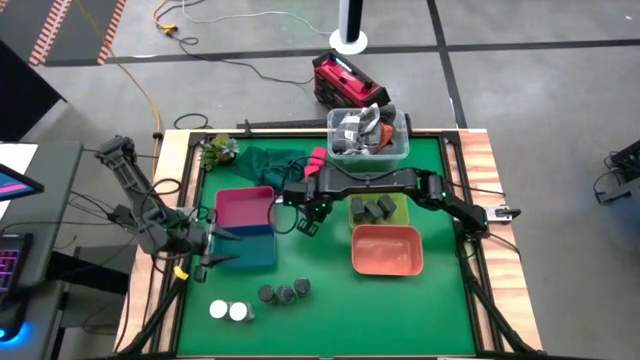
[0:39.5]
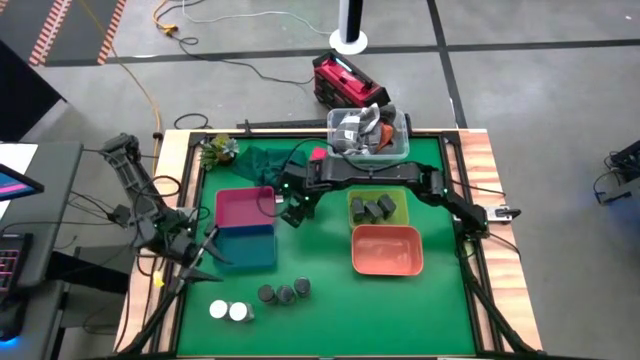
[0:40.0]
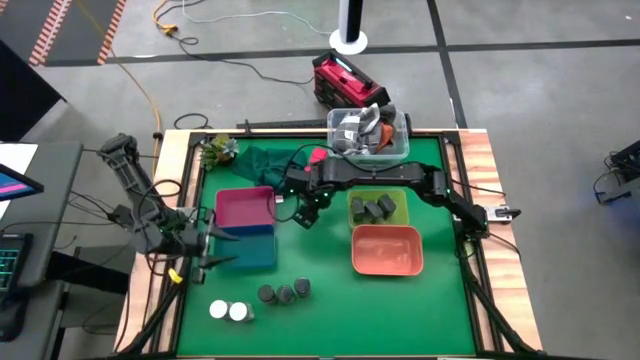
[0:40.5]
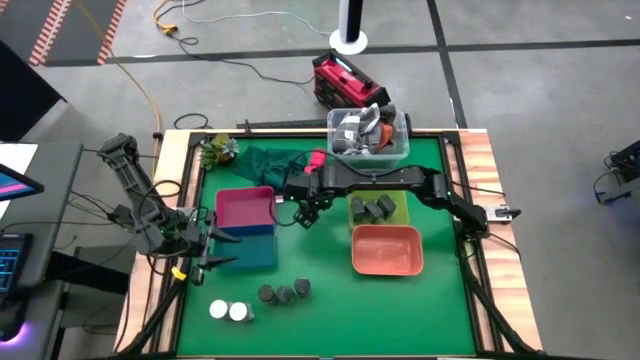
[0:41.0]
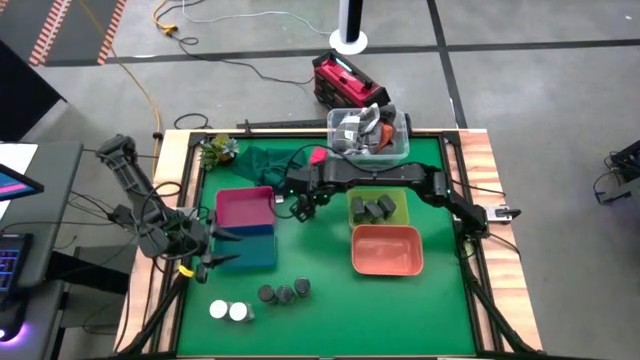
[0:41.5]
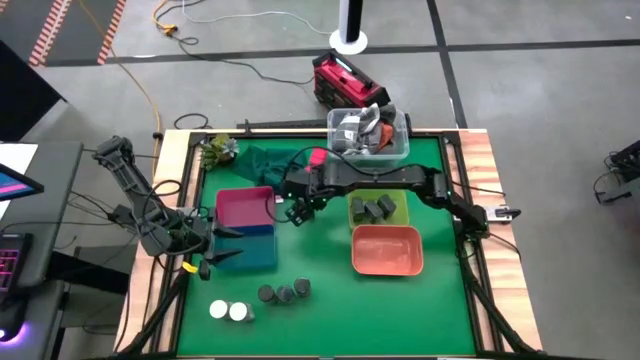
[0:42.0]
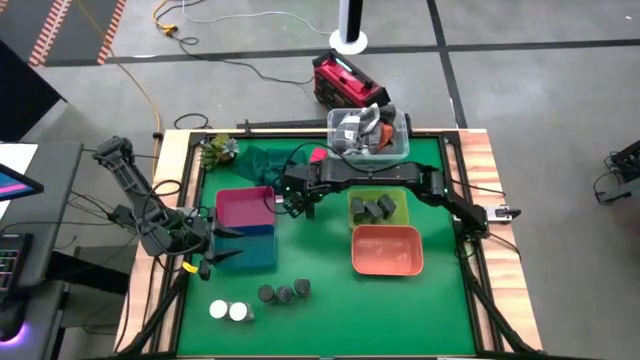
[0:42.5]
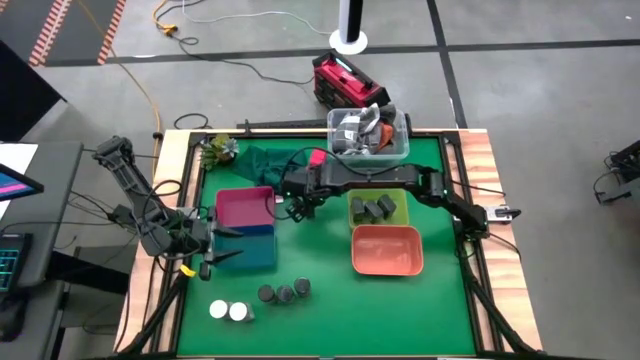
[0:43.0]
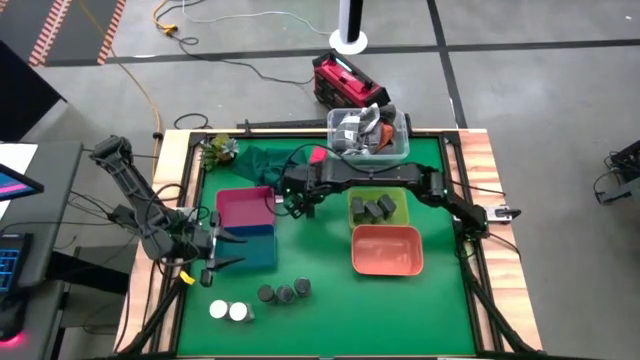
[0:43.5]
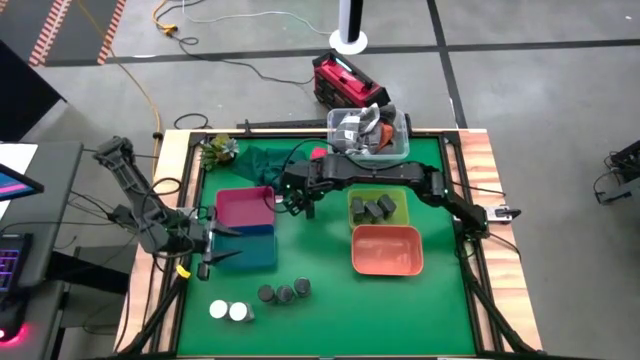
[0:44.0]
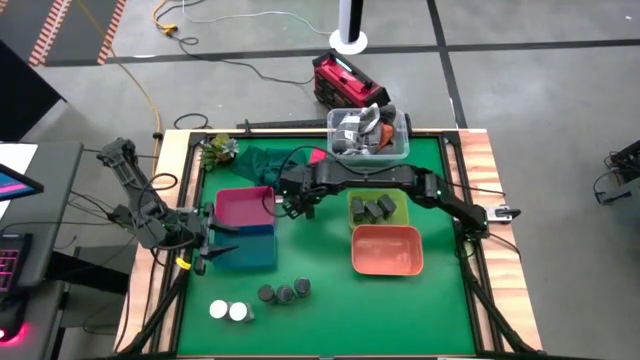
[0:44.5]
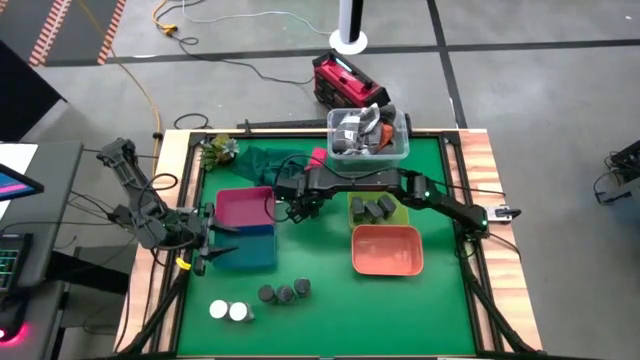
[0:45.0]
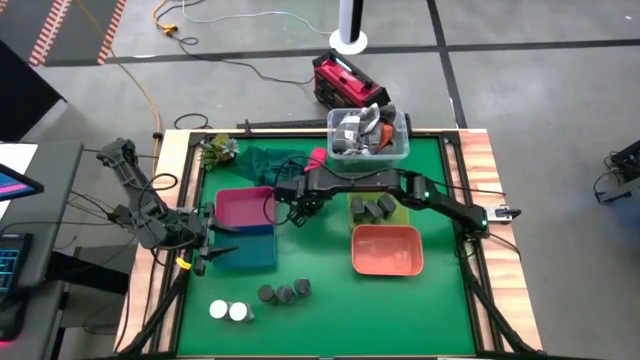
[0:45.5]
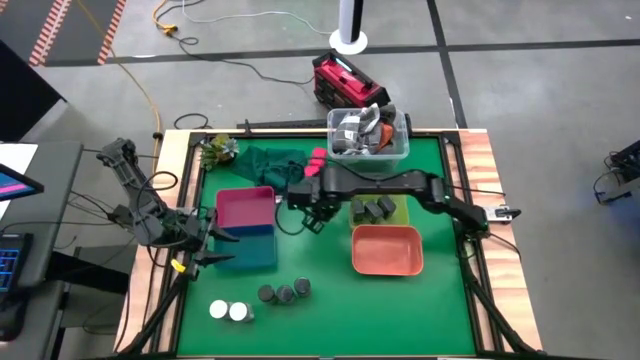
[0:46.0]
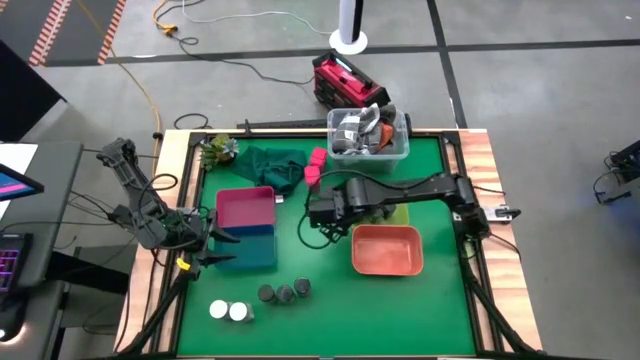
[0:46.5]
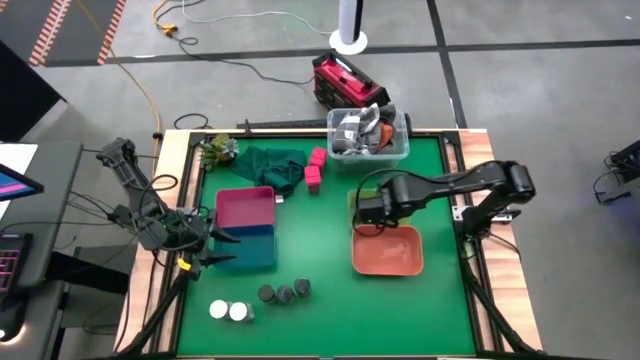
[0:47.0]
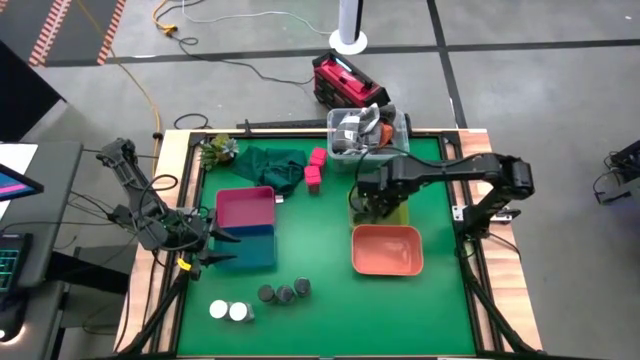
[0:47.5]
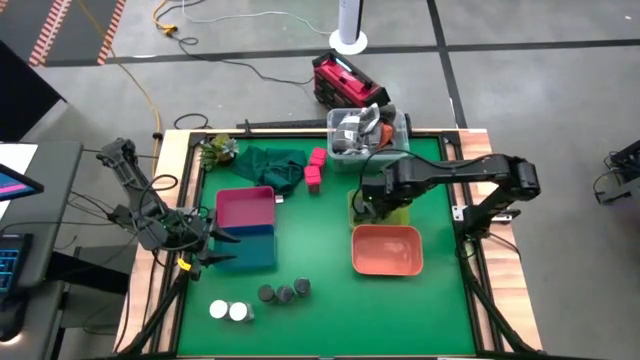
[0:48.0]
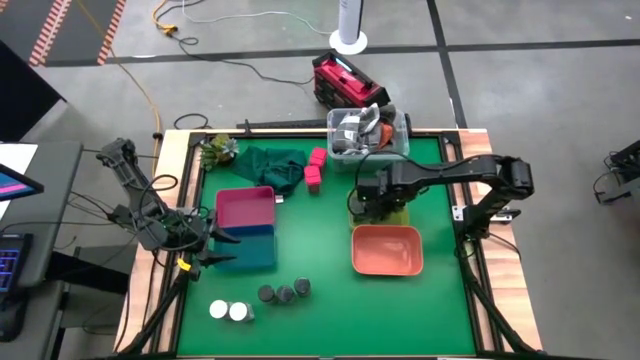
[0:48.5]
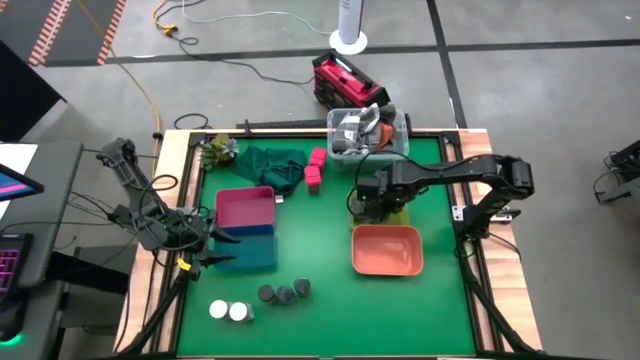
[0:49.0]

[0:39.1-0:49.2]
Task: Sort spices by type
Put the black spice can into the yellow bin

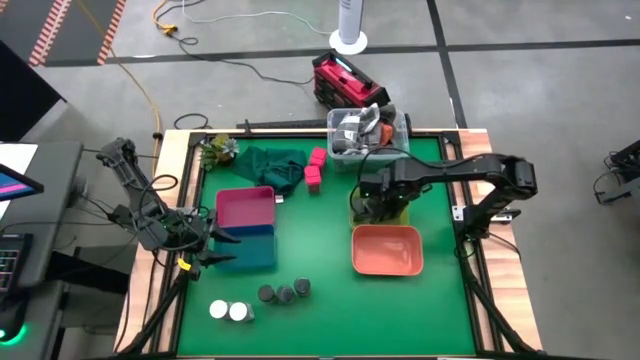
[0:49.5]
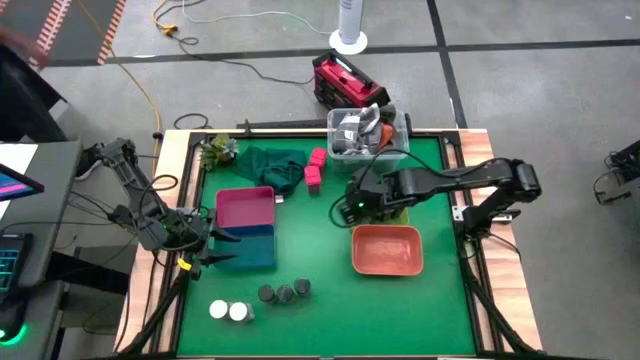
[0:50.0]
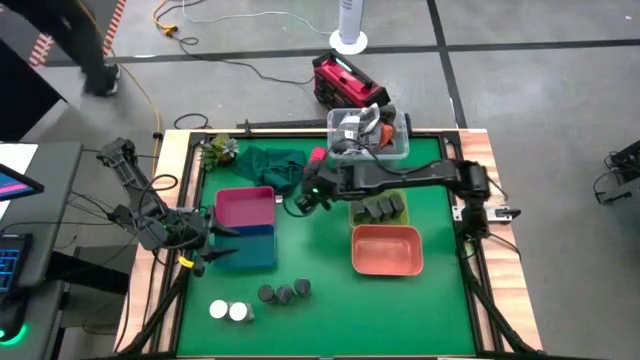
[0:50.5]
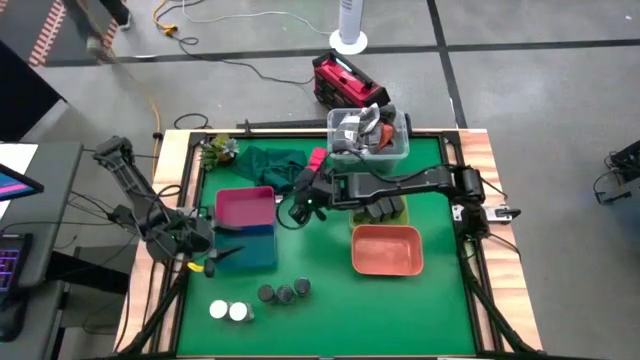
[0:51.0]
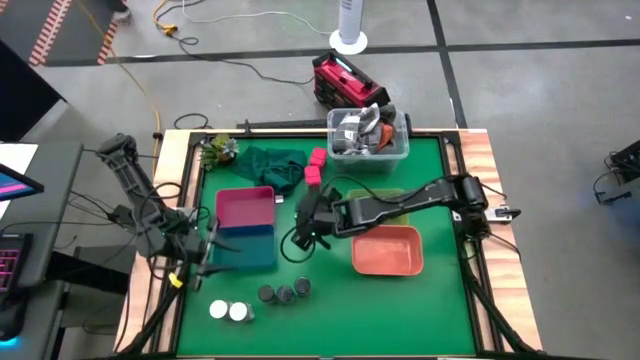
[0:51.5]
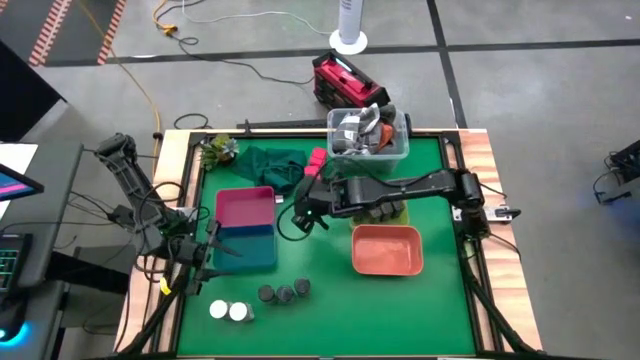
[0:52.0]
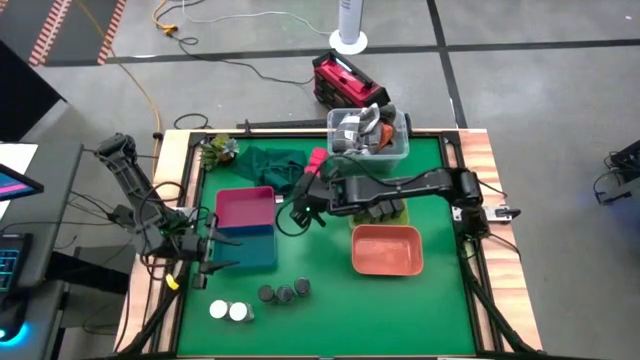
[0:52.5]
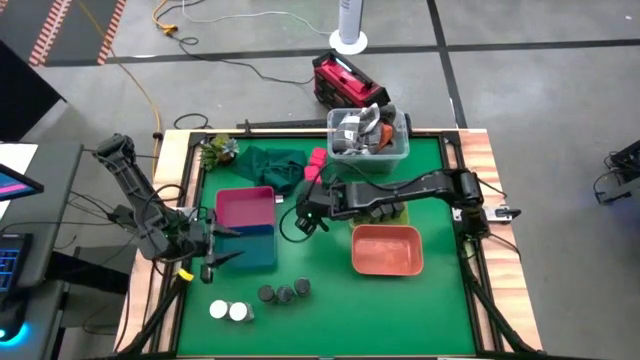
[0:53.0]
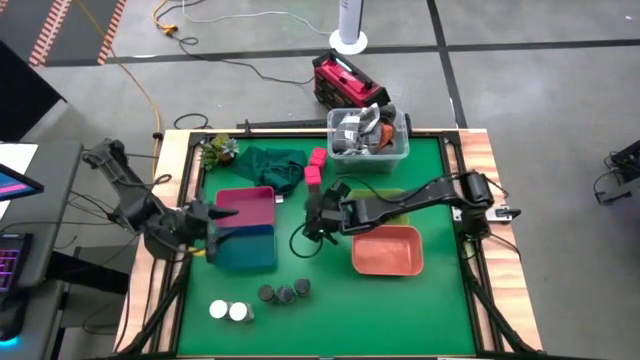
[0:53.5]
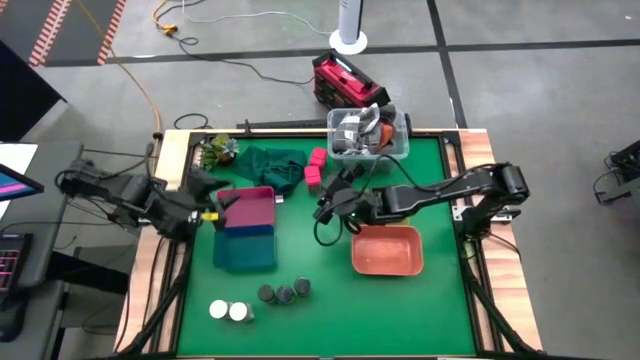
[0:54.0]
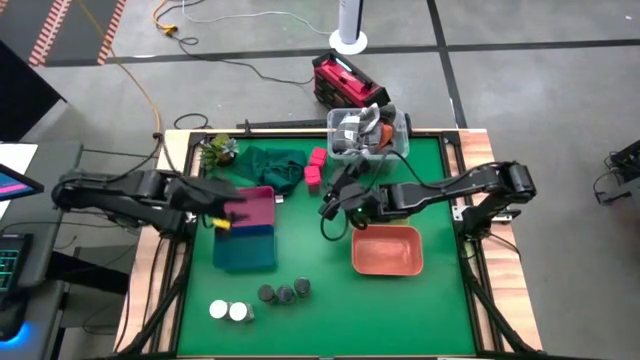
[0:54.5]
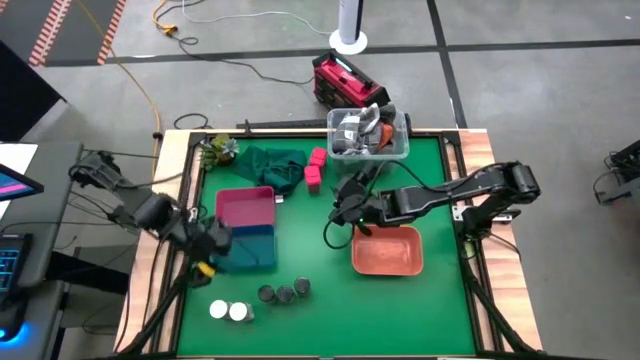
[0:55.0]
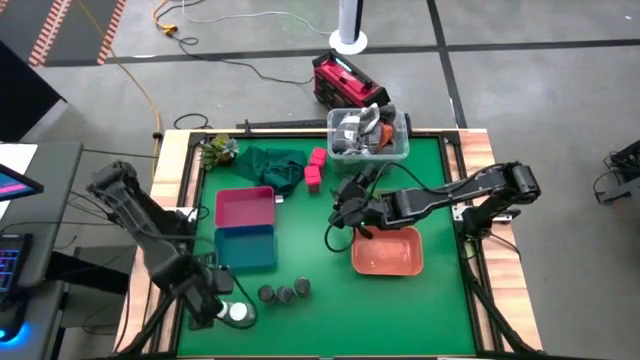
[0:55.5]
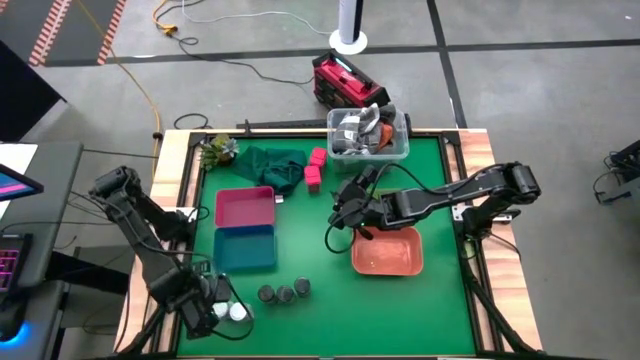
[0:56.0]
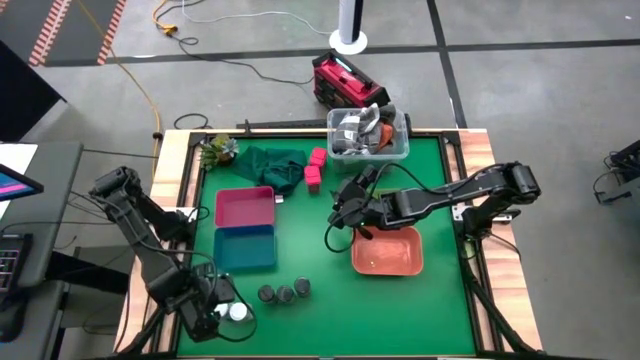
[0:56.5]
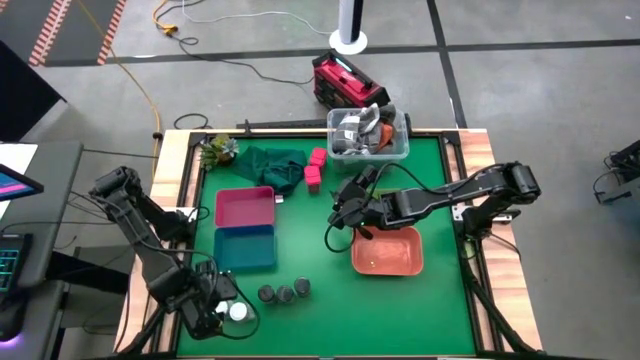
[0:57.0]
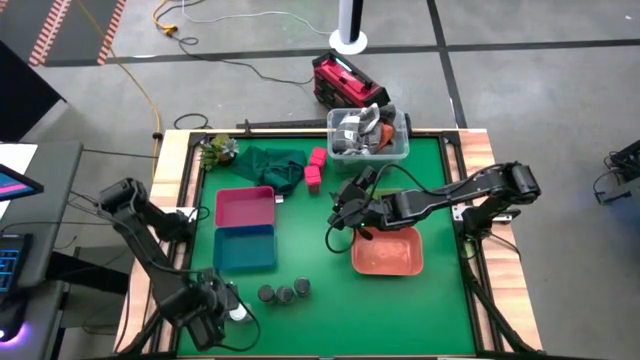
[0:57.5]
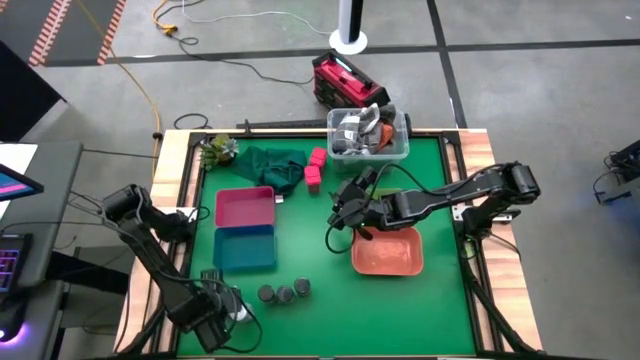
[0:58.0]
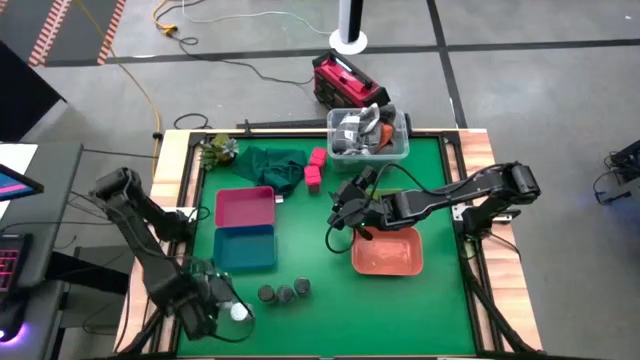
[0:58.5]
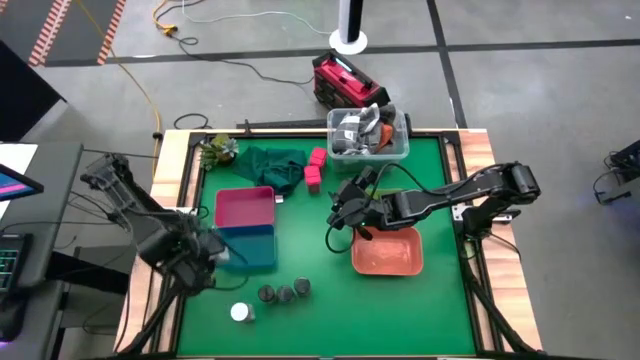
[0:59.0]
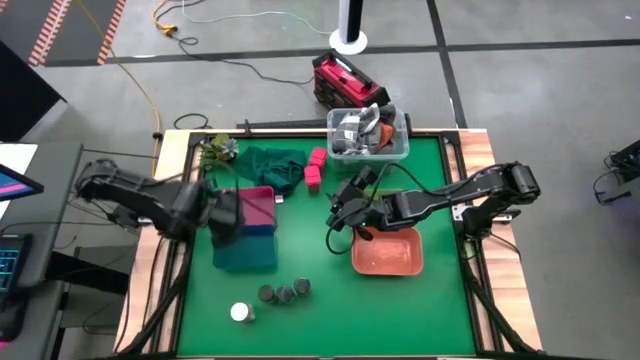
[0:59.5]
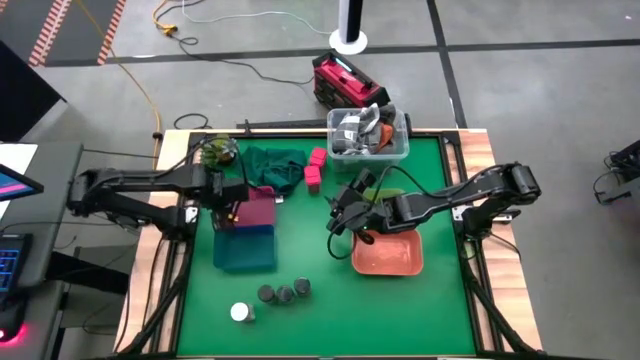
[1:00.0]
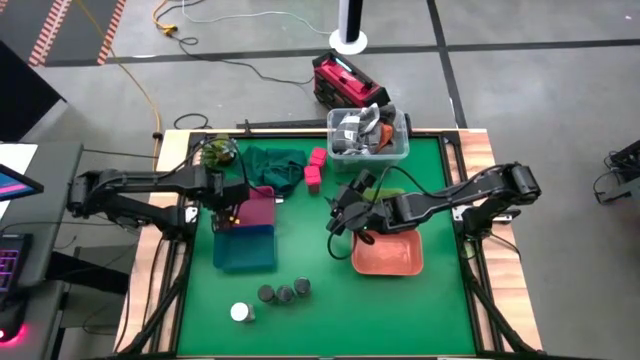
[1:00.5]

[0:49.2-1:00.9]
Put the white spice bottle into the red bin
